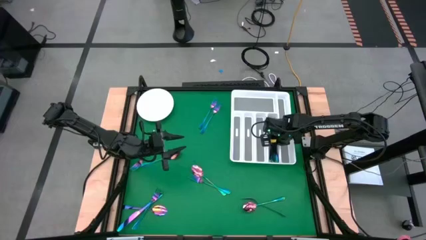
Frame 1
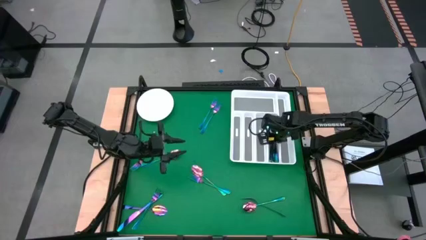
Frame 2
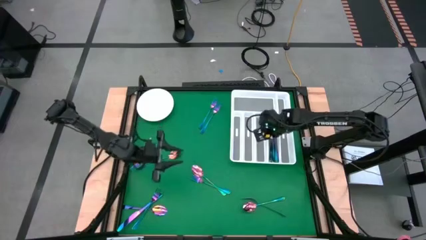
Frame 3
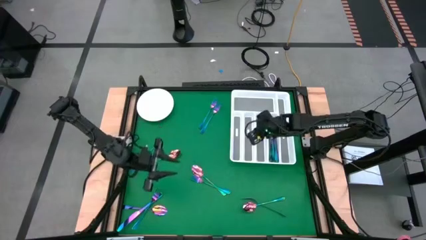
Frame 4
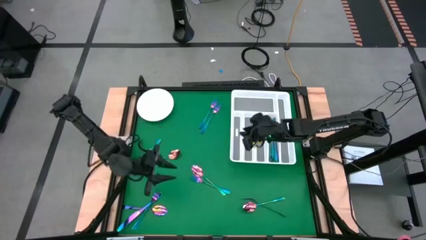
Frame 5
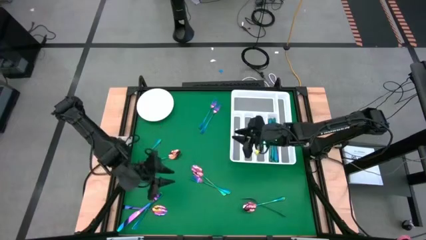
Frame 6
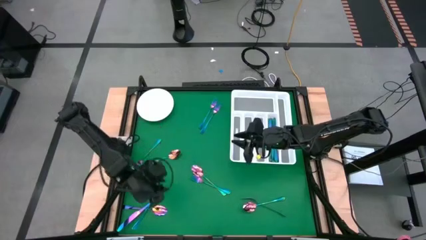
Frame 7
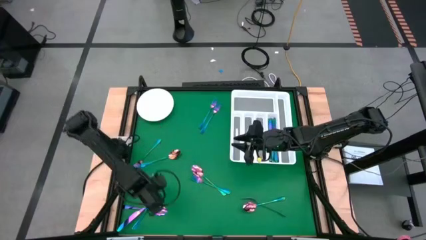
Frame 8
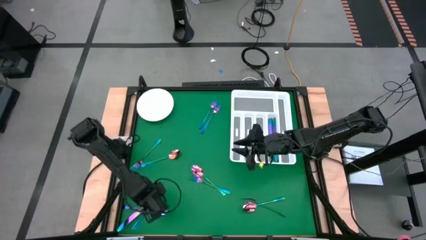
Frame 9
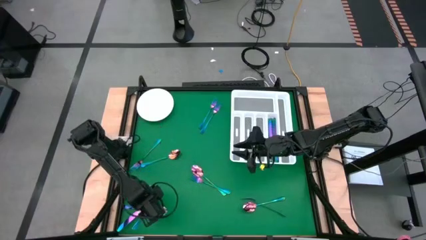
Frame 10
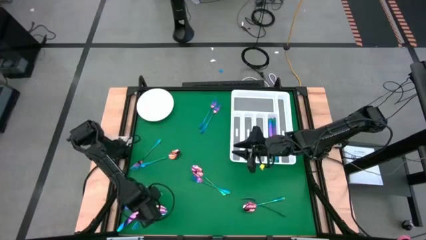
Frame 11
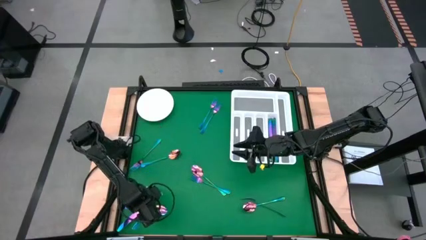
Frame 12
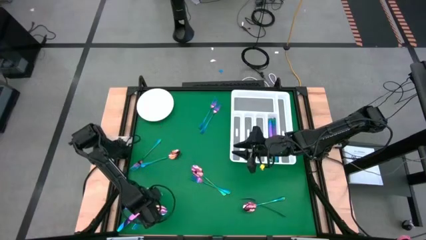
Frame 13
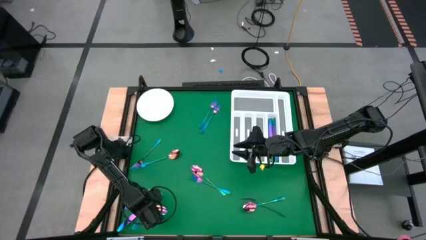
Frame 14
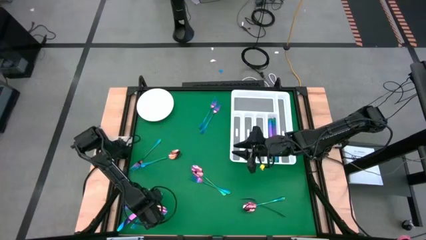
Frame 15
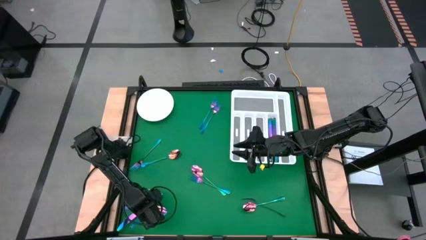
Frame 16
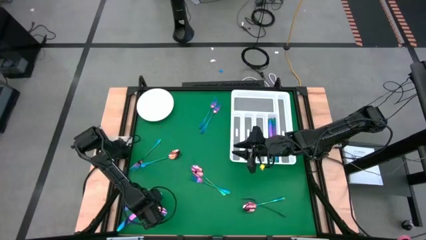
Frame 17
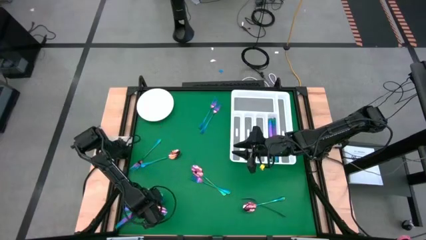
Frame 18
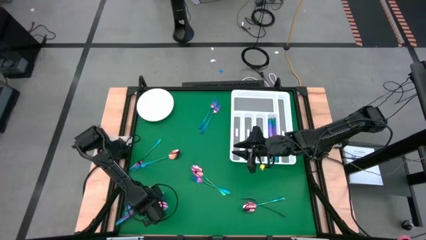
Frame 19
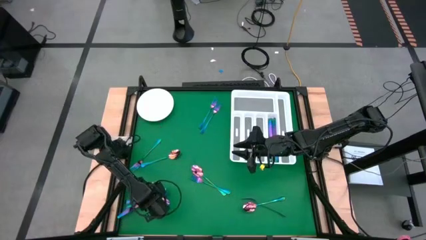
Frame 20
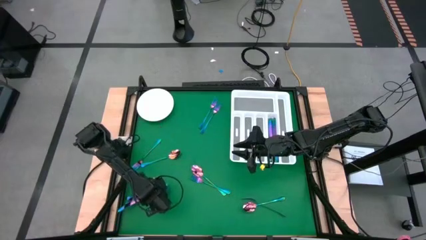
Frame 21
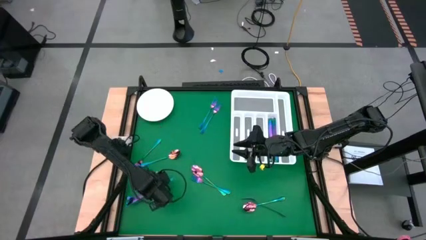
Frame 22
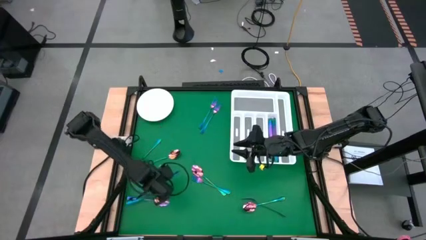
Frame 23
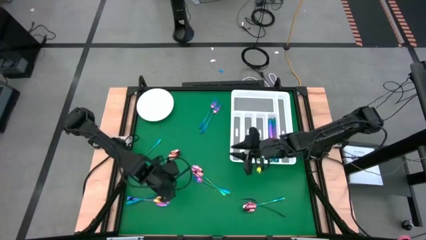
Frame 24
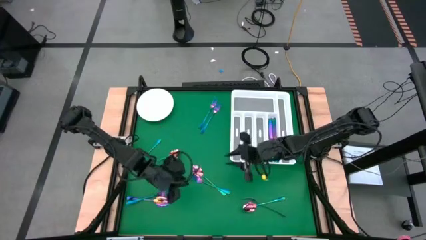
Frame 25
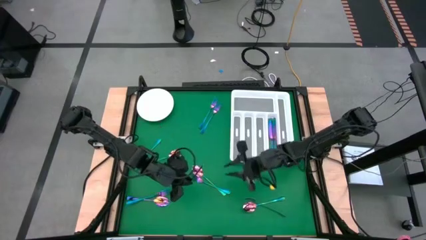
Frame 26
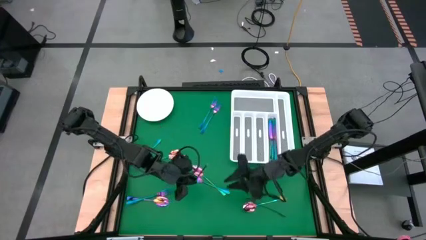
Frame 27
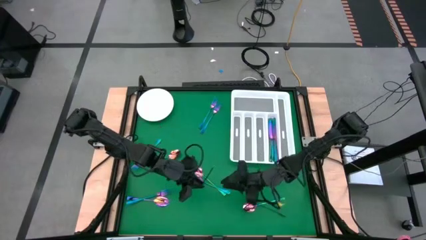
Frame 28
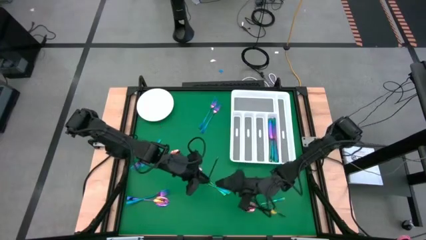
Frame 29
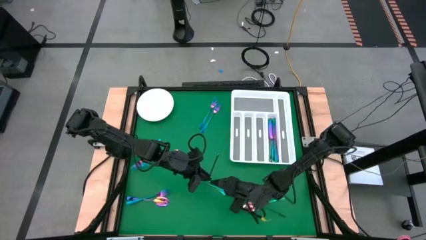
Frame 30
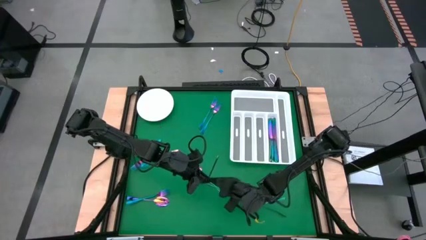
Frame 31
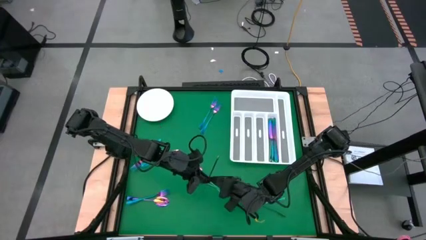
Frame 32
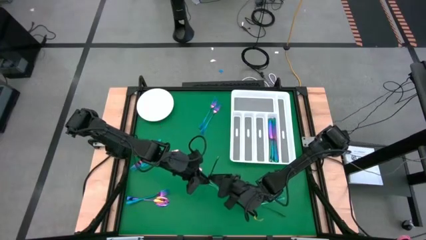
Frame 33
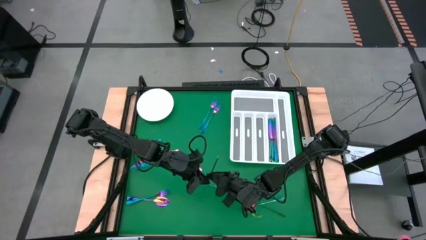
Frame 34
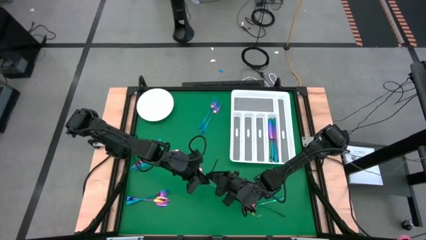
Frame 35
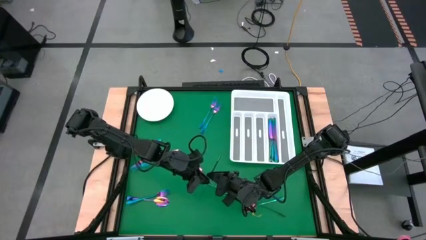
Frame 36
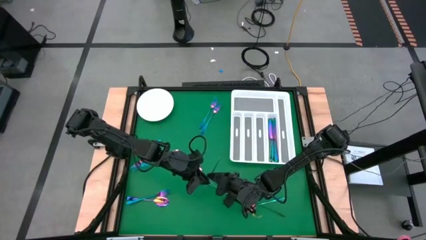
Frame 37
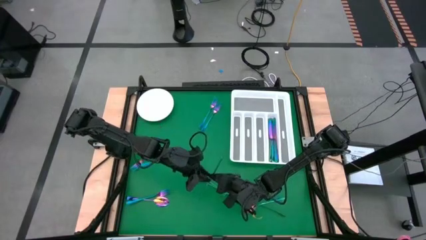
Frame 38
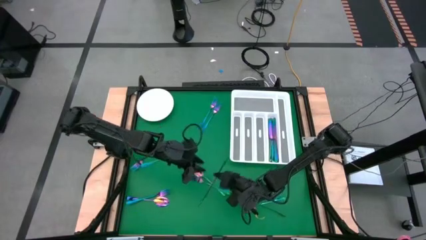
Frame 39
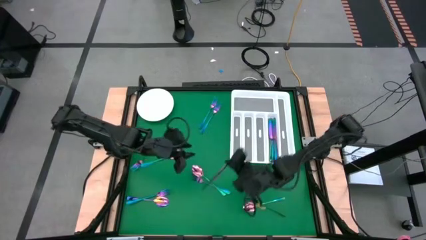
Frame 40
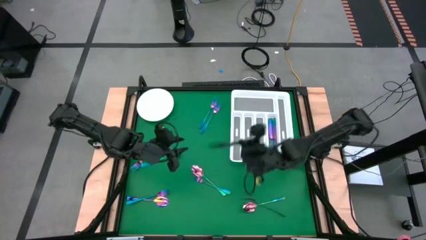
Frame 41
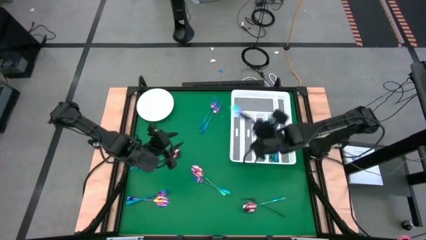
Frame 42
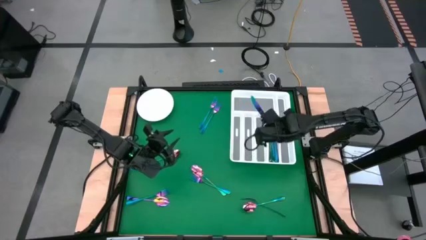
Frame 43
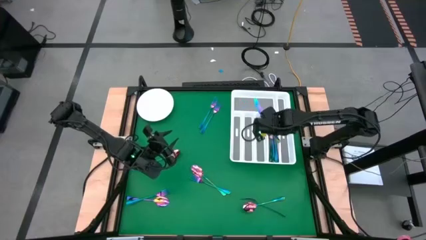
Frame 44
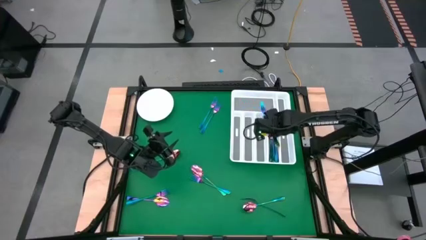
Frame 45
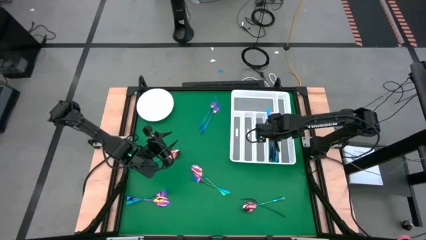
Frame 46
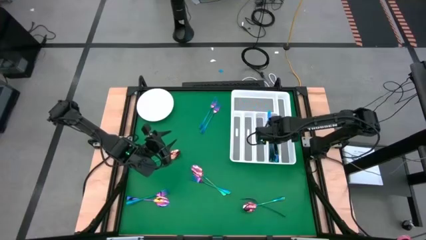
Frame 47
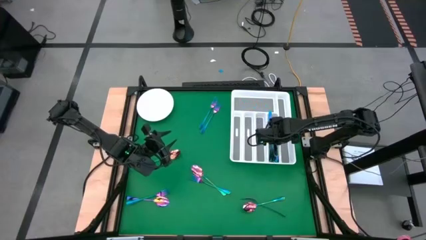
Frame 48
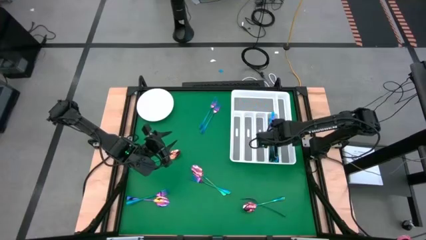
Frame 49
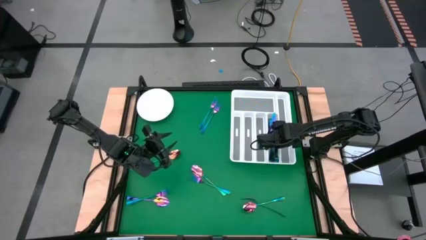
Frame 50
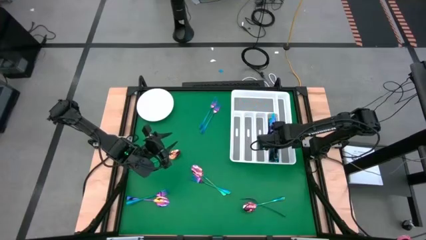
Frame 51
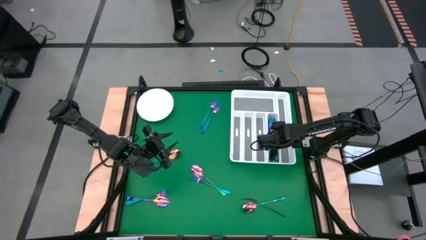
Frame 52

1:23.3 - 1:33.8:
Task: Sort silverware
Put the blue knife into the white cutlery tray

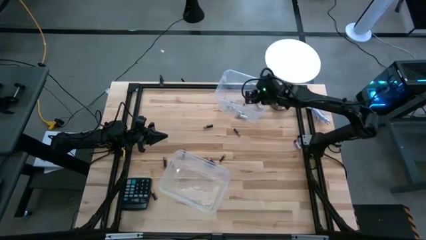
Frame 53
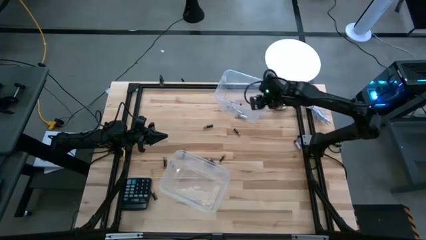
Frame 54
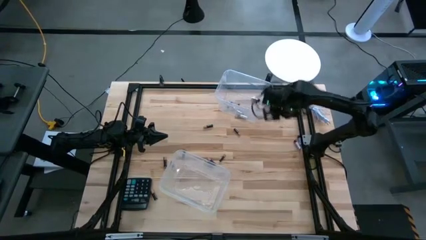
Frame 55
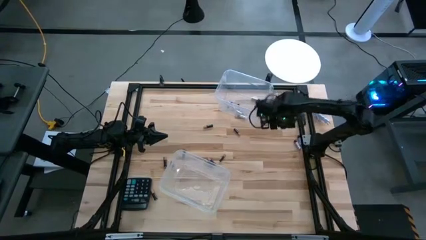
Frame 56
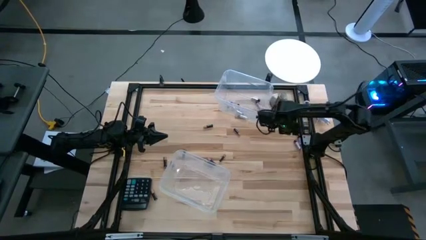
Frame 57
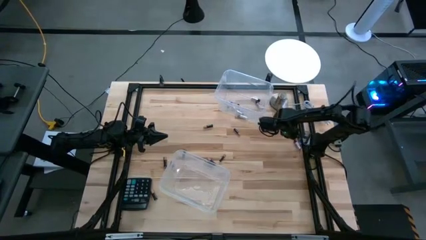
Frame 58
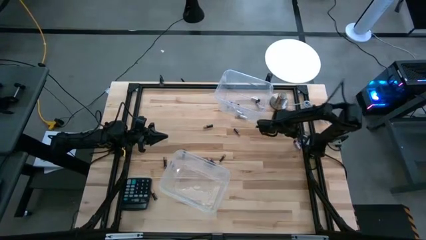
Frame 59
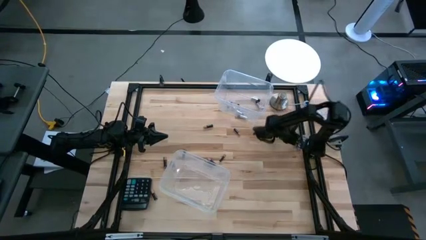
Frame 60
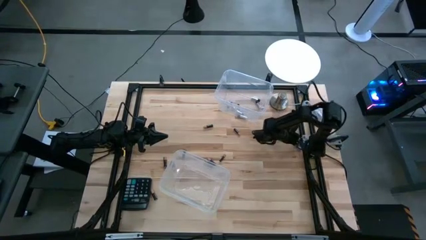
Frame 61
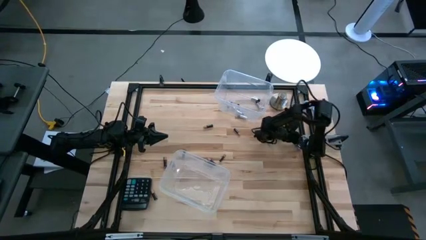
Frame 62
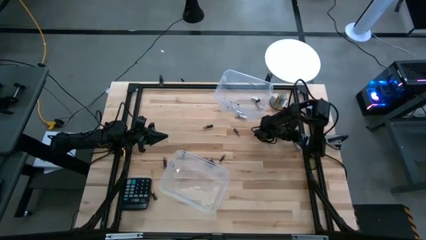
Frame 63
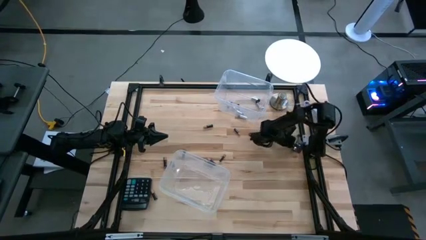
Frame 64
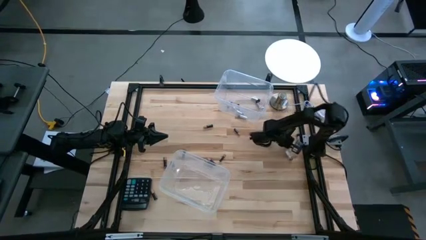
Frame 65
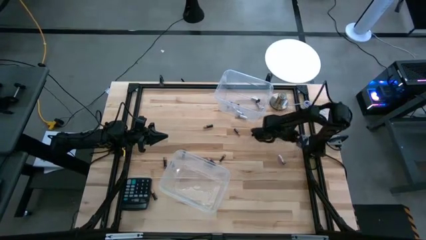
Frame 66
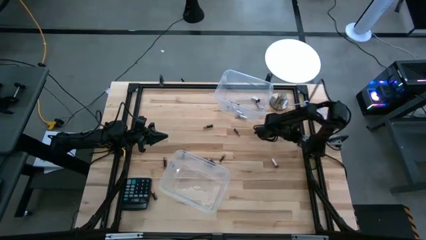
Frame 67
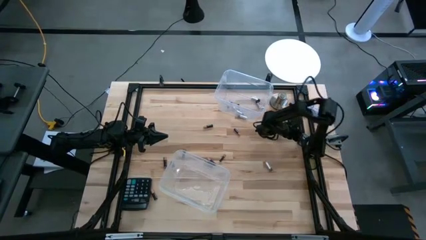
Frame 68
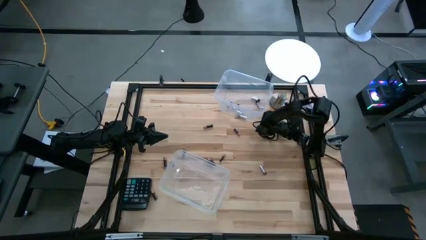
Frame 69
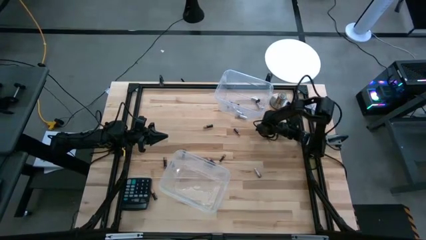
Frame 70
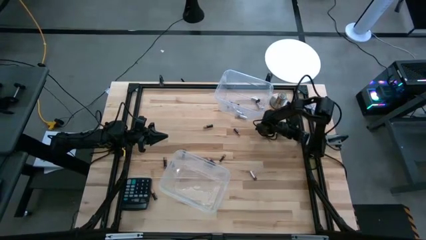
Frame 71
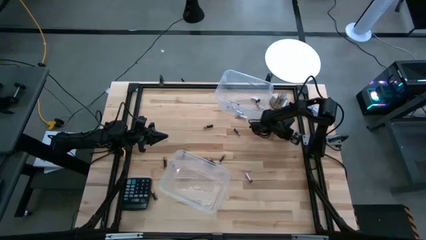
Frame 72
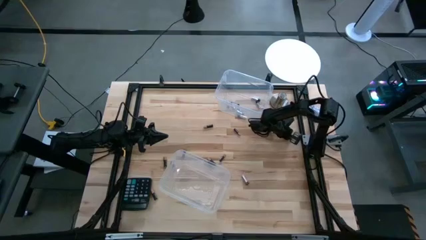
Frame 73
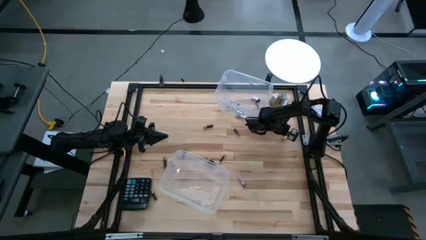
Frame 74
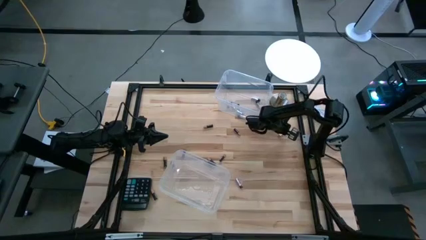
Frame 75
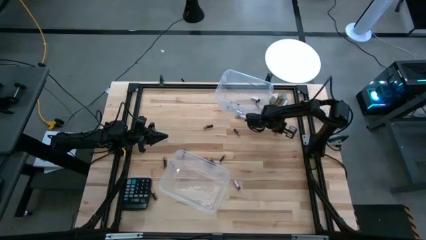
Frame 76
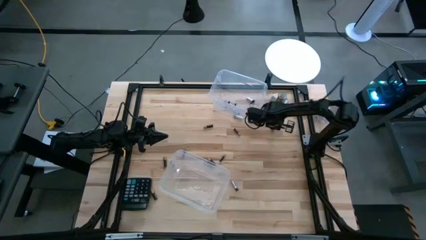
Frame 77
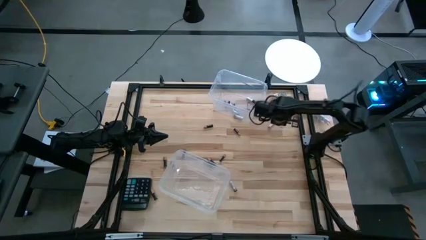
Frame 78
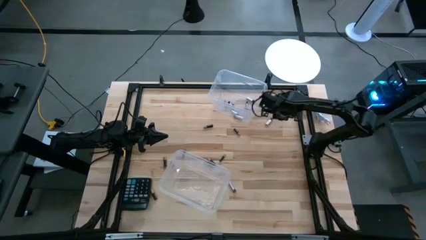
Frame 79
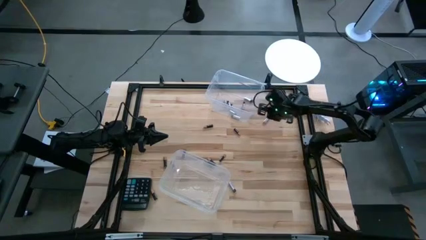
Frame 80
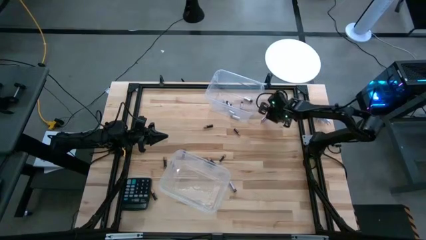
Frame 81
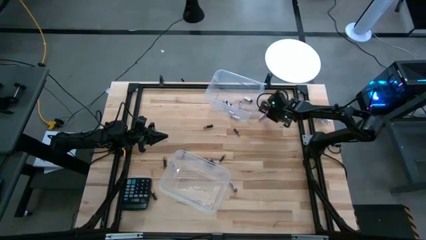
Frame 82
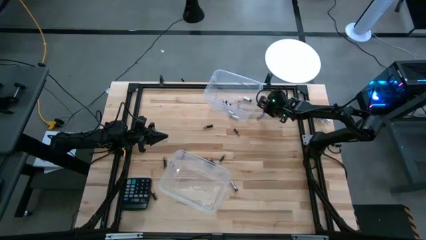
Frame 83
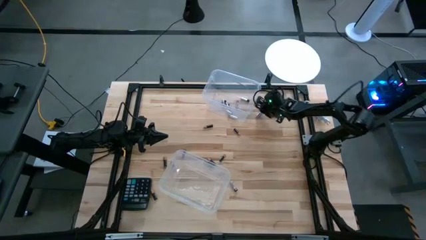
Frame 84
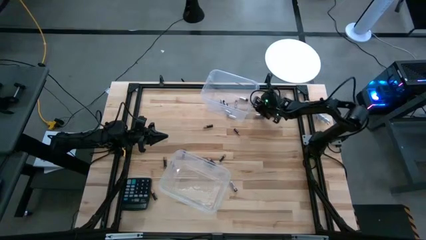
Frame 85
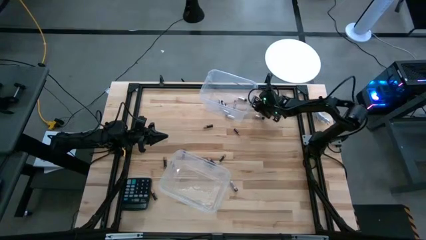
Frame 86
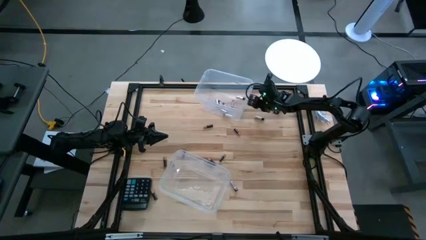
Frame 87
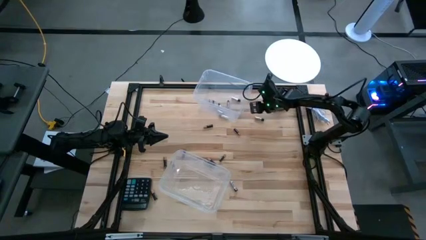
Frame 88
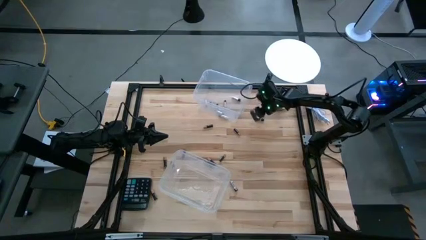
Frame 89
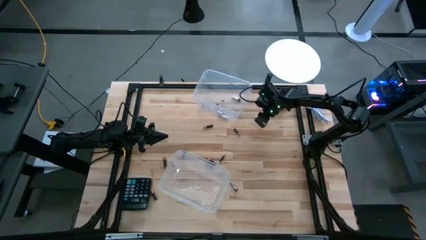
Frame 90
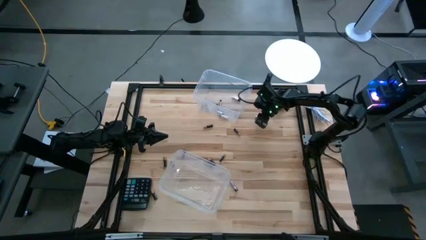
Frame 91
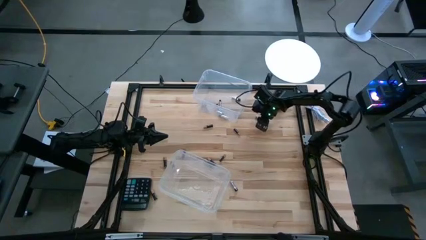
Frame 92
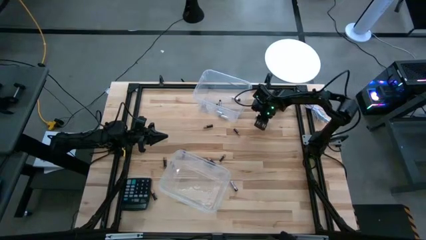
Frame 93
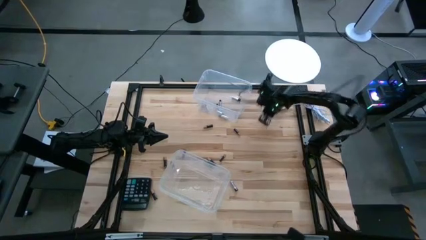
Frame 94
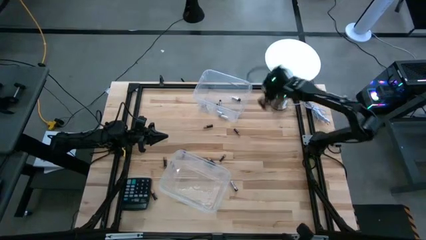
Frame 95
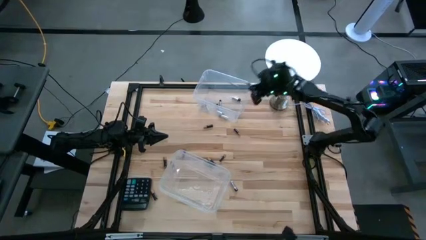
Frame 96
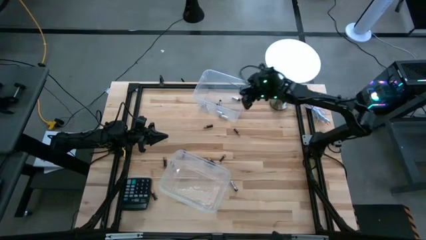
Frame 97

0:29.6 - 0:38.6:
Task: Sort batteries
Put the silver battery into the top transparent bin
